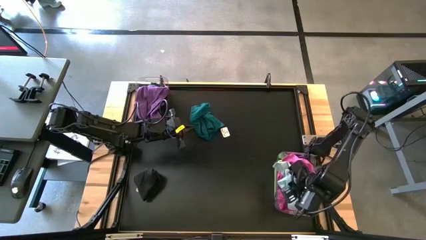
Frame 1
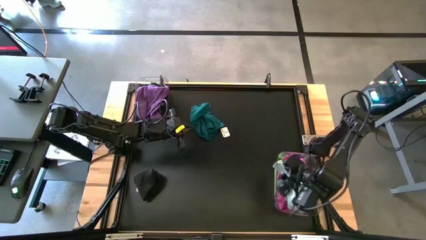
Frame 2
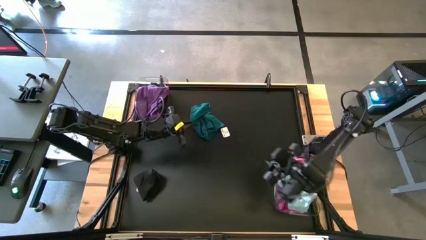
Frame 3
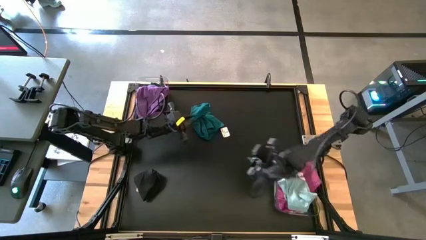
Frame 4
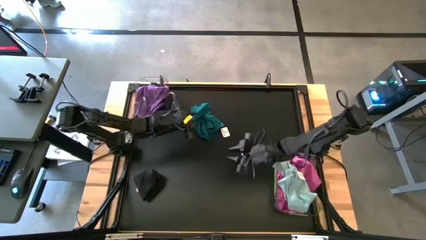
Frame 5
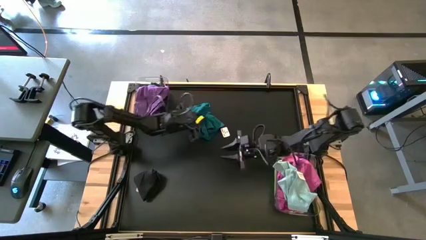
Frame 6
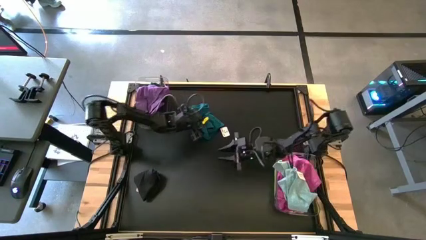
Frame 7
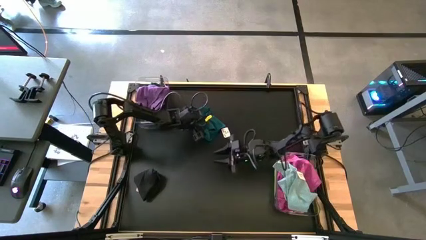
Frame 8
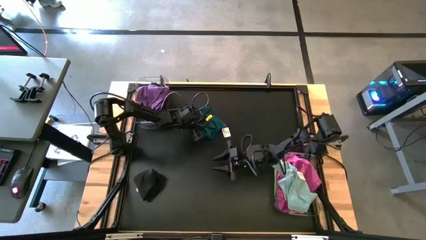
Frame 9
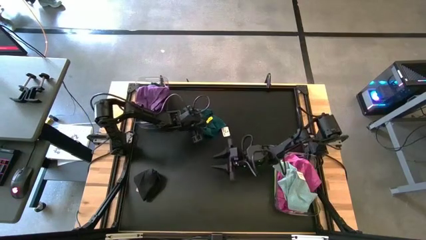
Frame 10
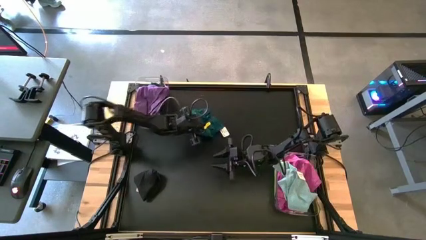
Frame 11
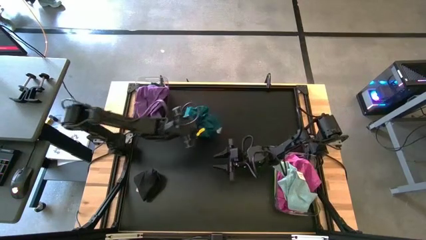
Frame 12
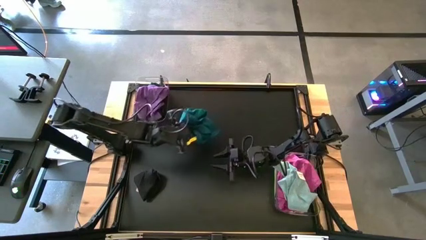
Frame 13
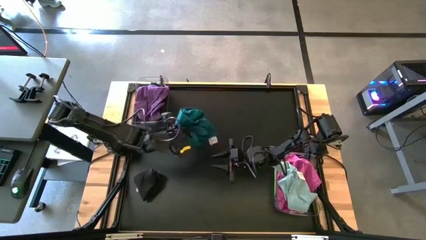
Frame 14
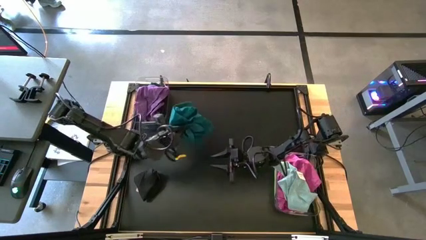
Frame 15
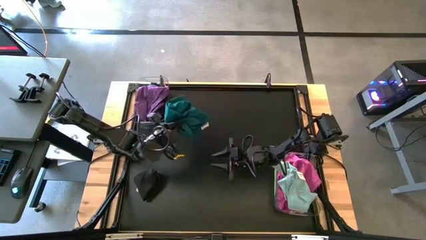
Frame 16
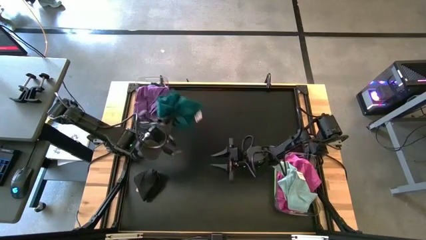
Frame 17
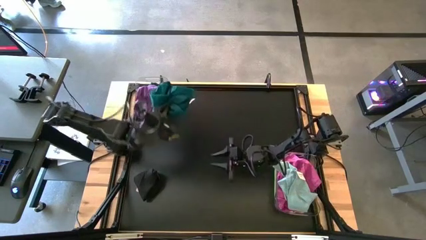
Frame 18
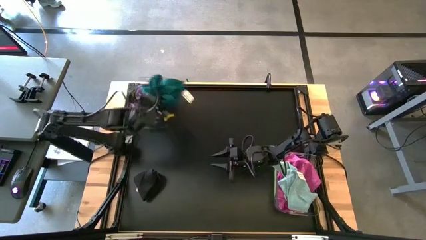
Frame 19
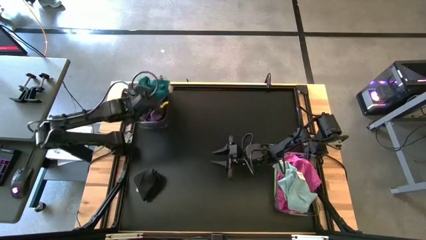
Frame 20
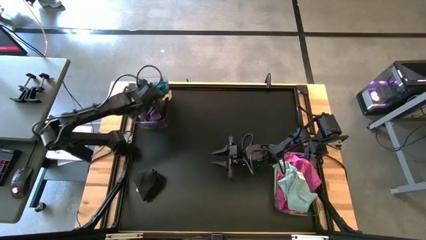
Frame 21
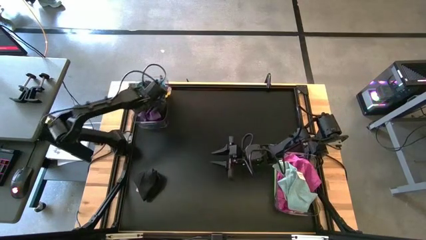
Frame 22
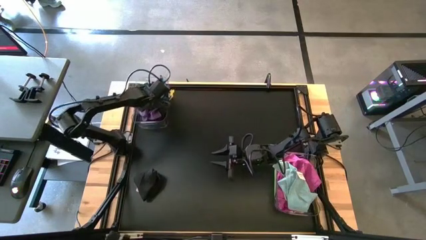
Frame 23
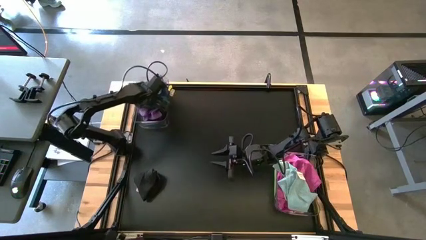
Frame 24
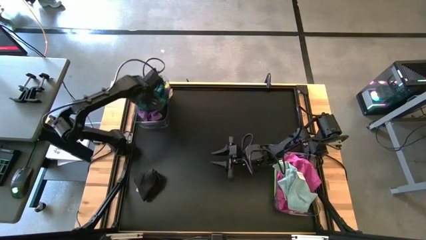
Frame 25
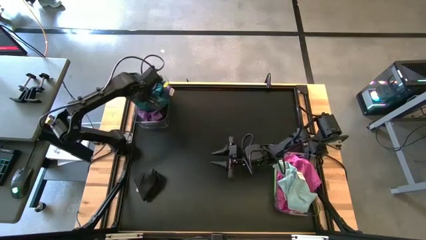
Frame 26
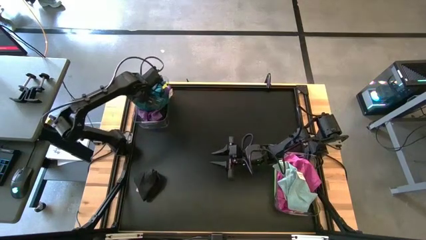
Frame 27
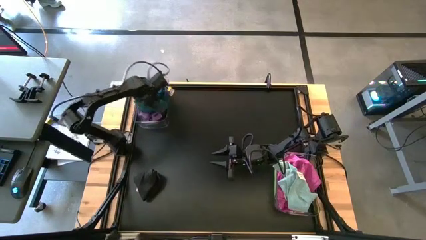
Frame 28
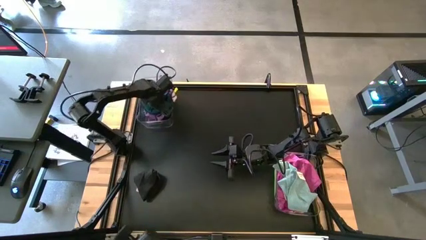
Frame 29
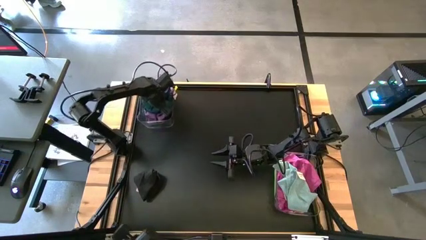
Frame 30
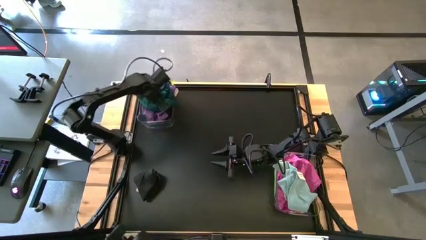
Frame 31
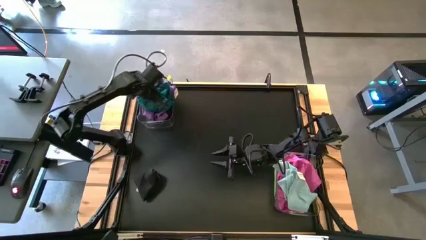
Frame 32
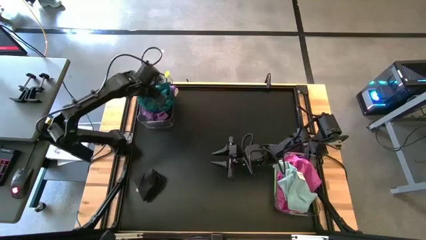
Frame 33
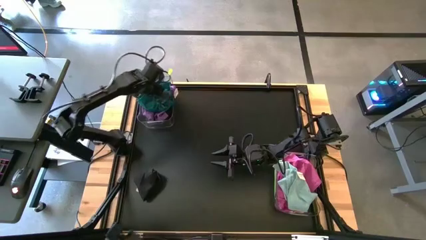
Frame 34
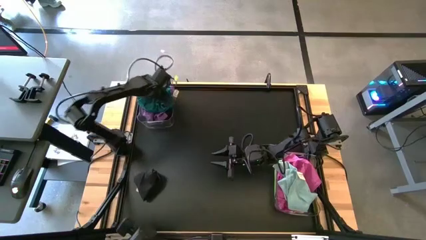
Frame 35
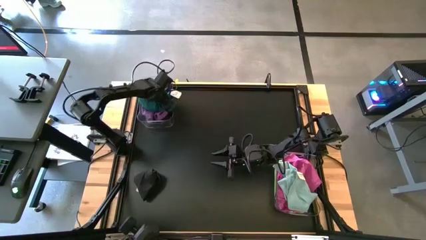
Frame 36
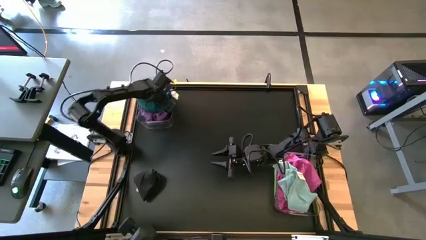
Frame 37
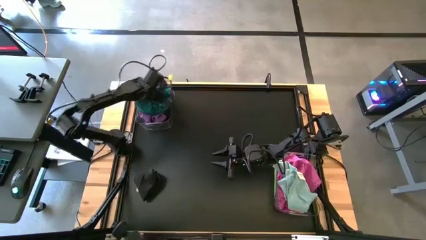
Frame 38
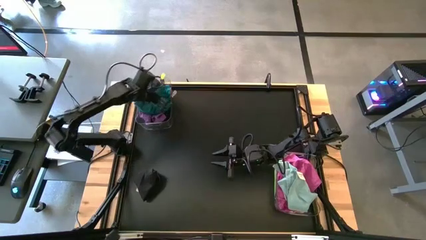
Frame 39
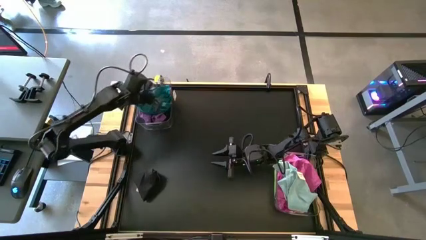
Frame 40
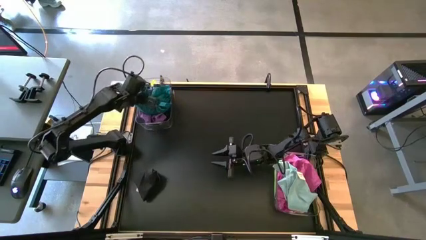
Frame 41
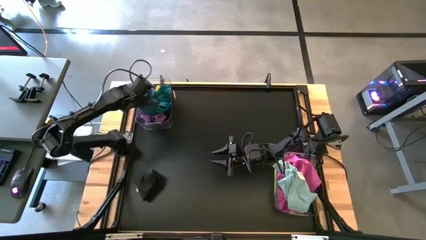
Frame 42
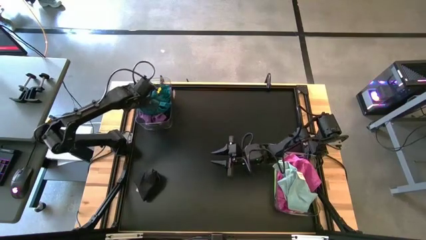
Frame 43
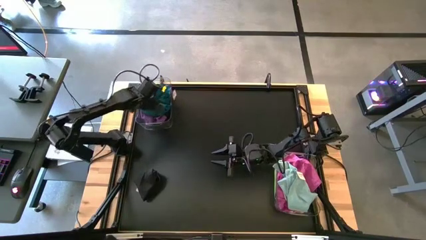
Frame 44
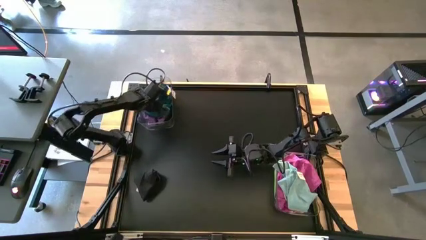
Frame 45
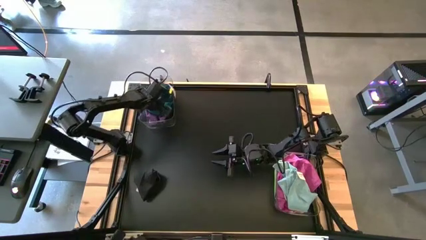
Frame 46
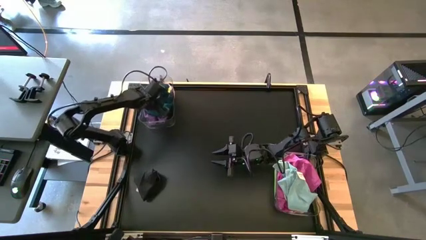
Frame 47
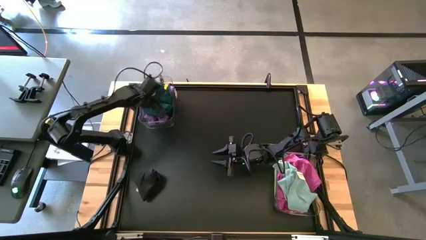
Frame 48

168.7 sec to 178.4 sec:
Task: Sort towels by color in basket
Put the dark green towel into the transparent bin

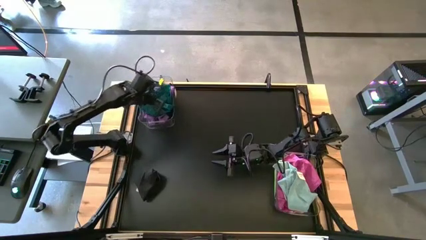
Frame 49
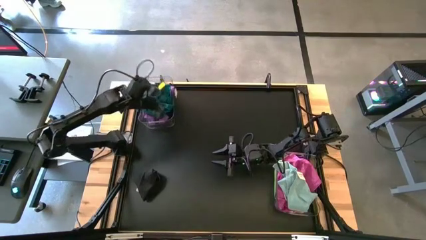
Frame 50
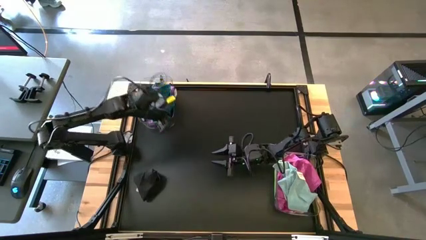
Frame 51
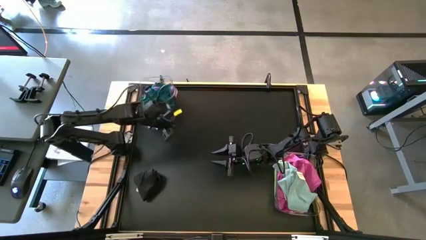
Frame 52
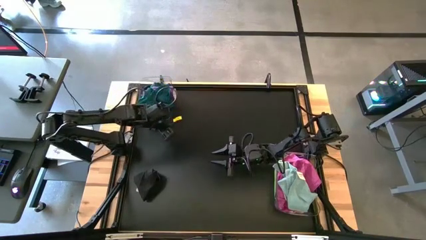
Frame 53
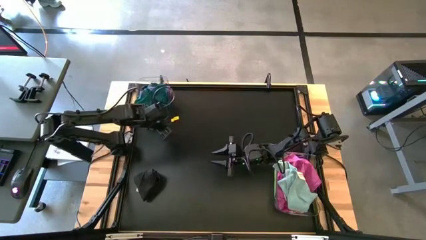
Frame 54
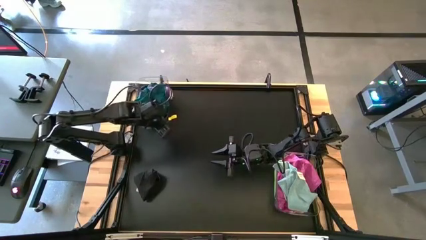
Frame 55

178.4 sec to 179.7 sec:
Adjust the top transparent bin

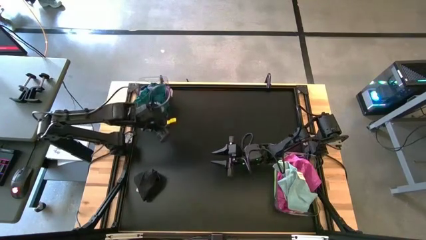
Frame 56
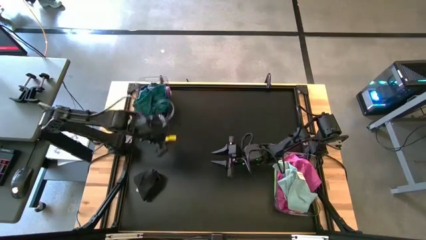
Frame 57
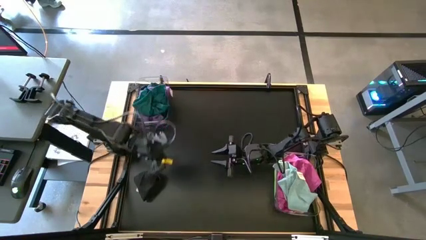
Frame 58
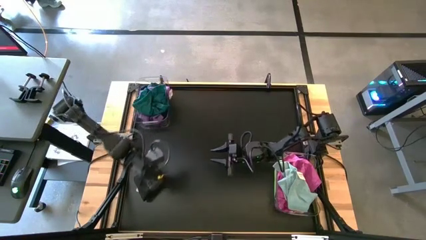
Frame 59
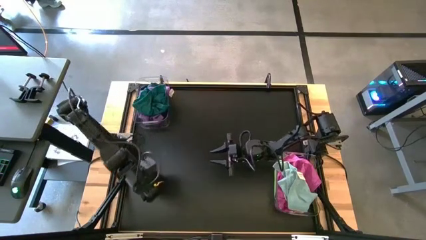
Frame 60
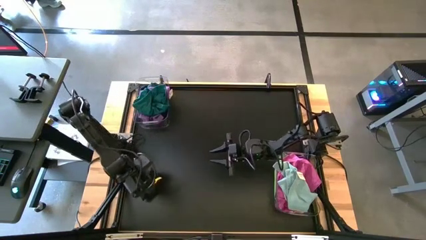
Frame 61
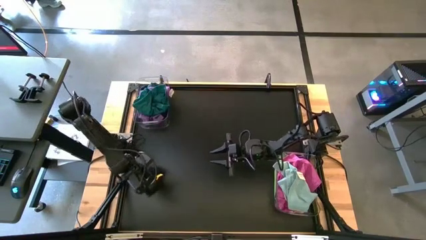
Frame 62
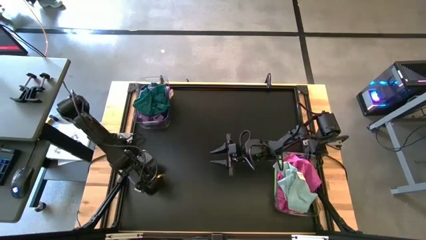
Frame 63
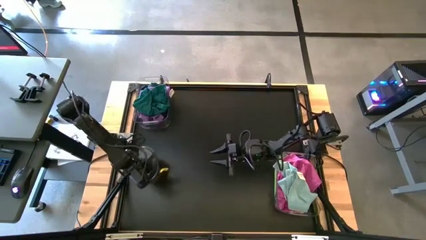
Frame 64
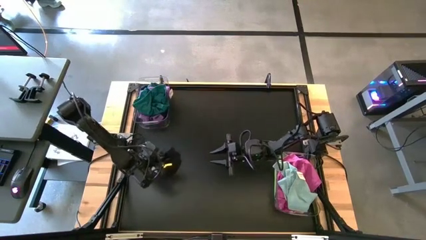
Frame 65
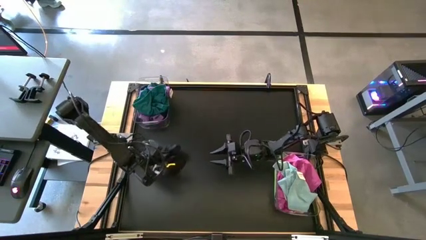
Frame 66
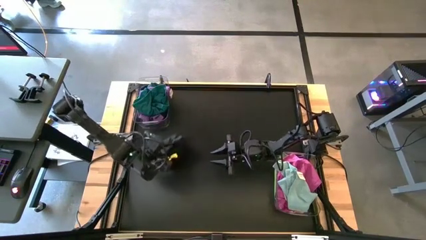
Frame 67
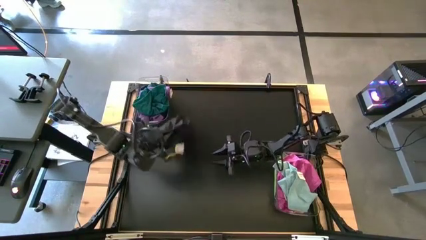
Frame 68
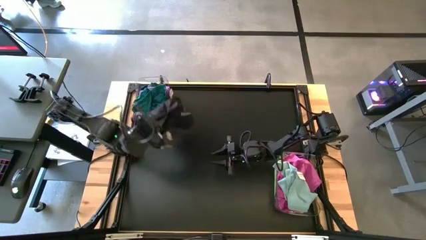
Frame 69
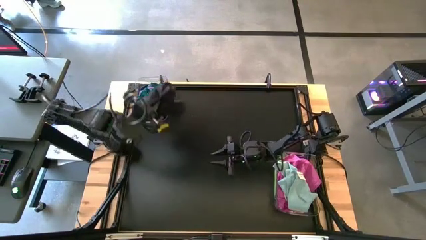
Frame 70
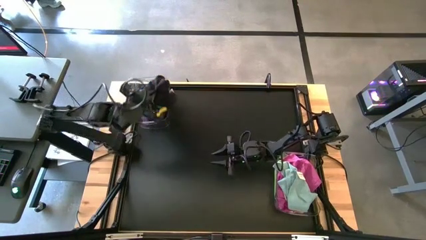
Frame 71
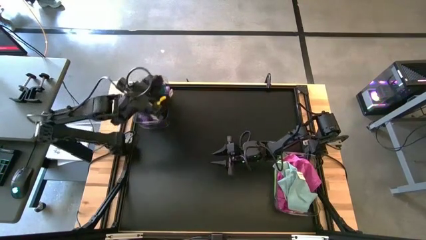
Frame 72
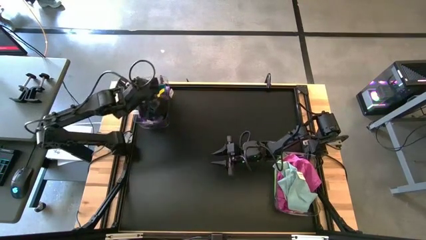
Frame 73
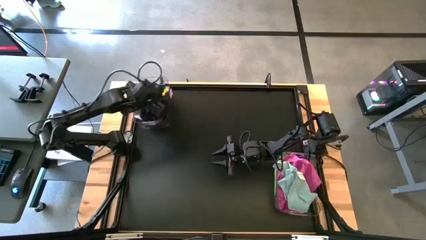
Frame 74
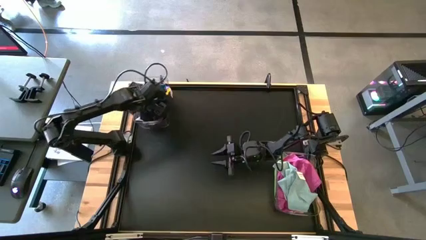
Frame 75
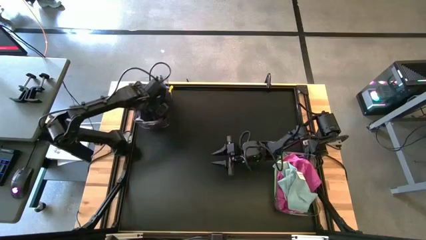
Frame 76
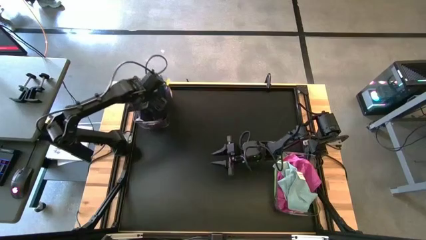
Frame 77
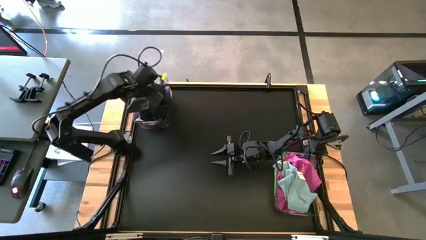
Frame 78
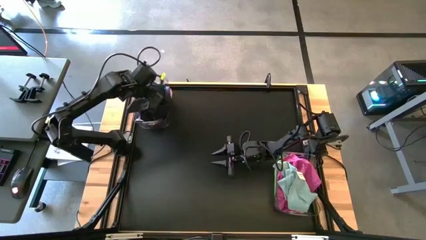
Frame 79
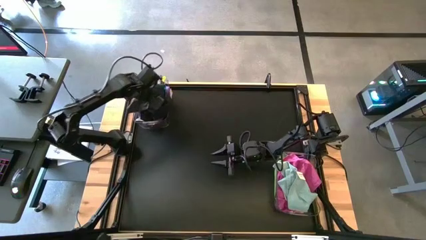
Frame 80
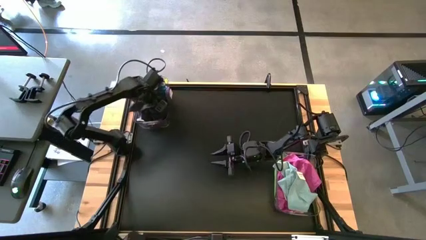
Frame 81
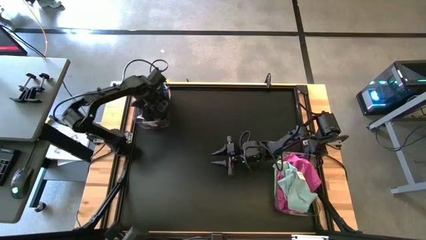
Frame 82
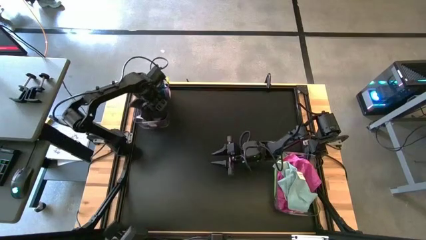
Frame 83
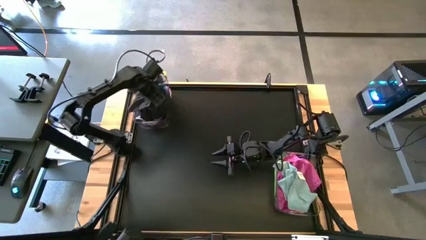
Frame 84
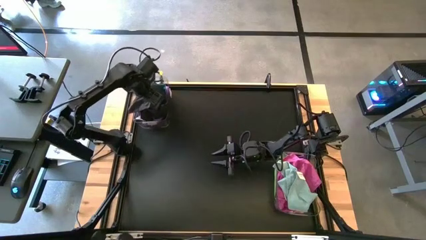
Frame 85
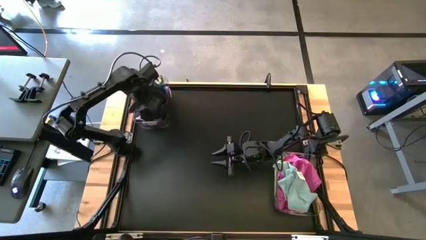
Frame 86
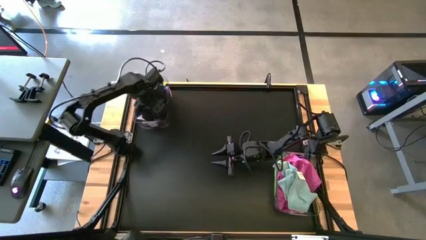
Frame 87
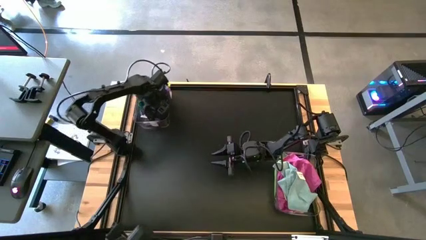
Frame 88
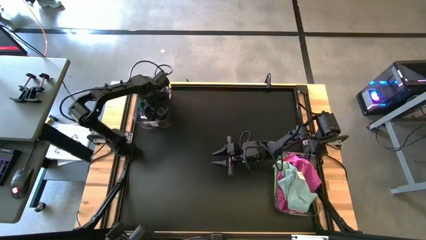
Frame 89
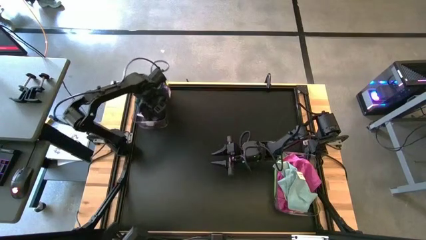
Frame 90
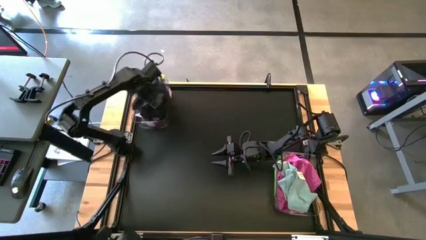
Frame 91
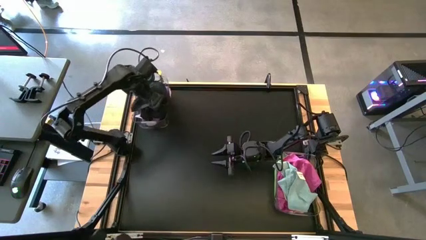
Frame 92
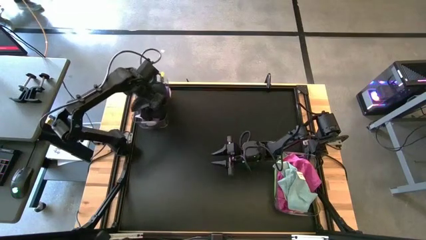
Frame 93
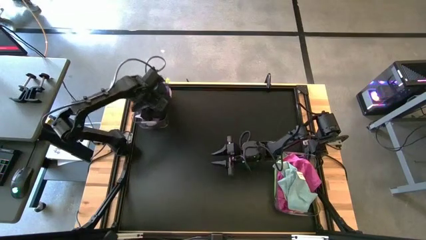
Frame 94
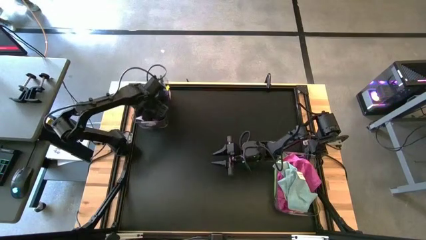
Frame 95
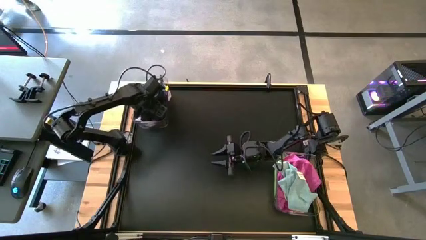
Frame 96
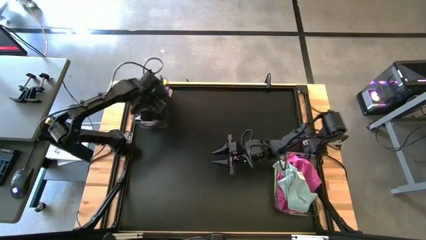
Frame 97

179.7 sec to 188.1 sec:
Put the black towel into the top transparent bin
